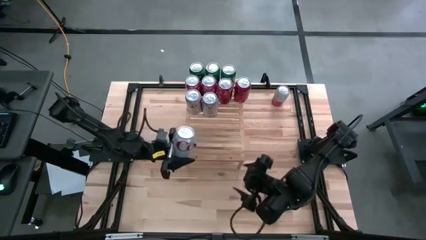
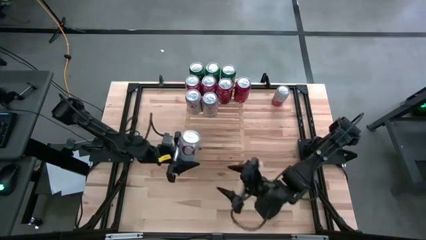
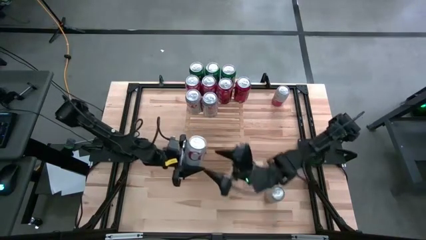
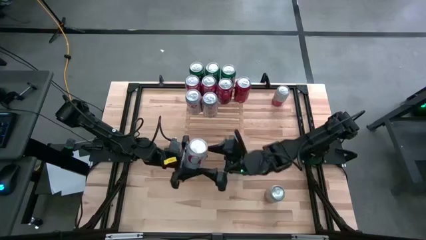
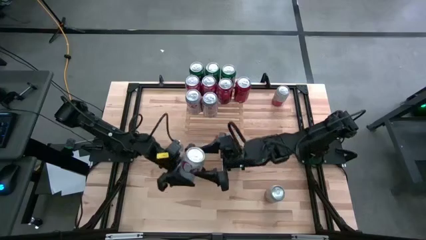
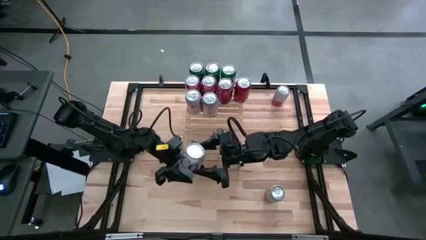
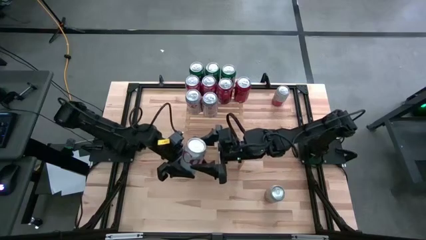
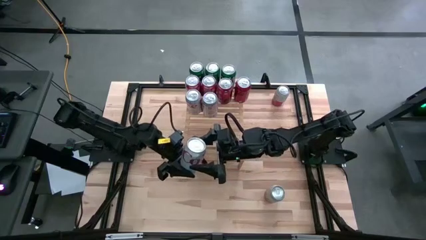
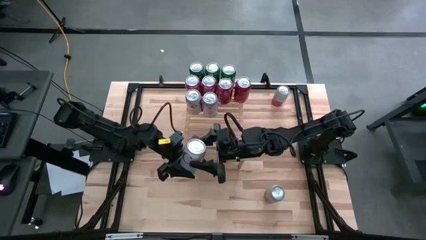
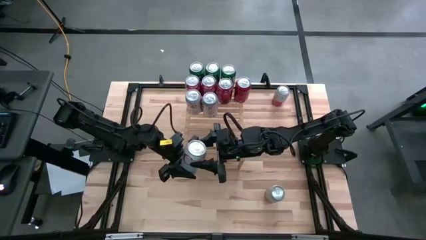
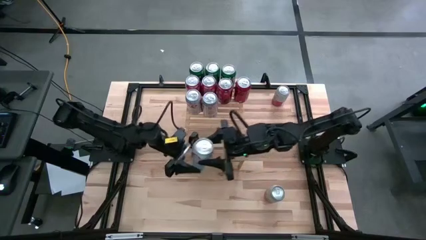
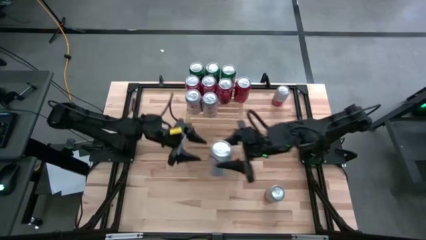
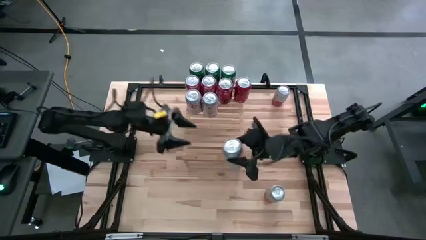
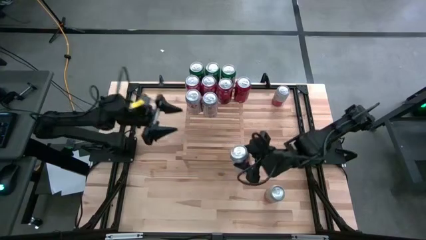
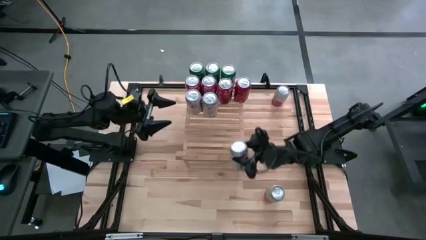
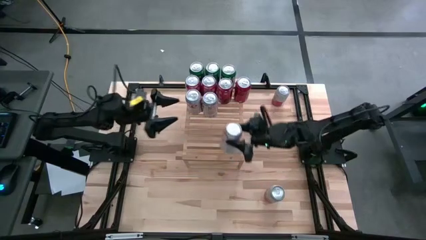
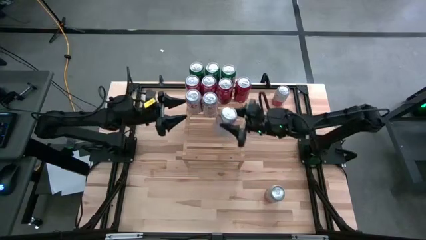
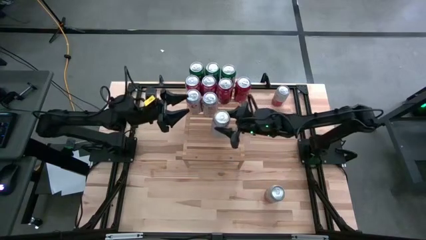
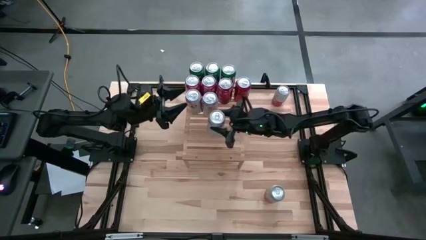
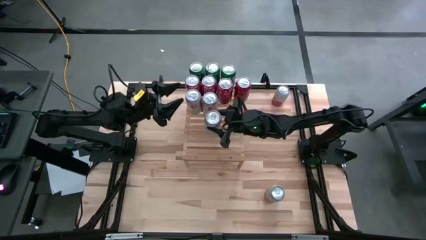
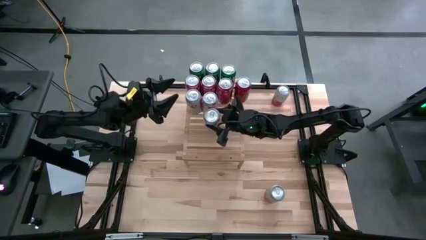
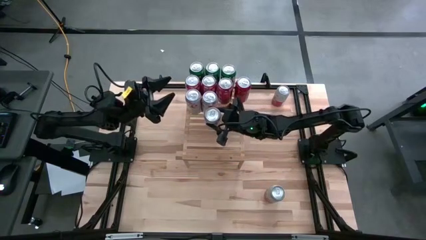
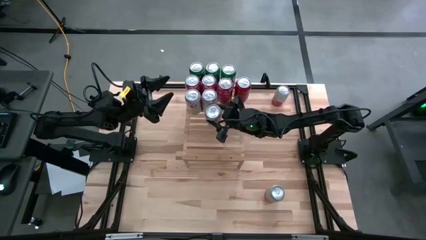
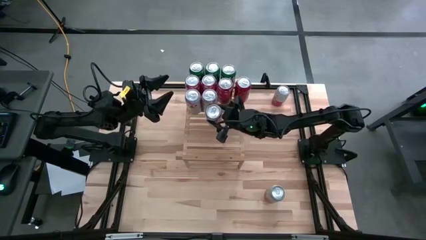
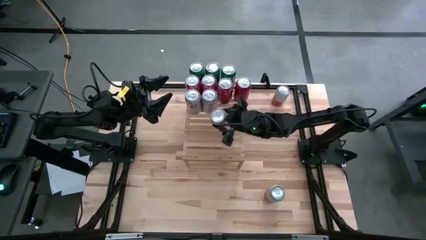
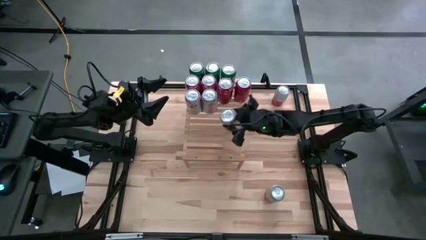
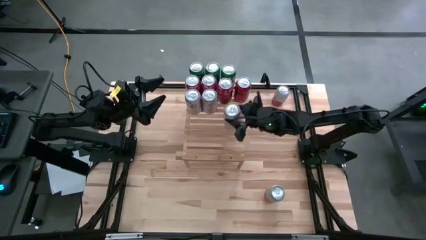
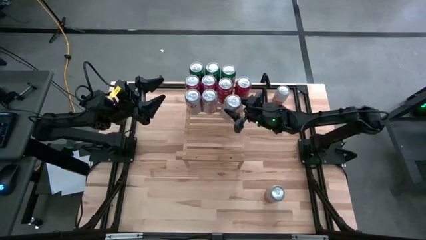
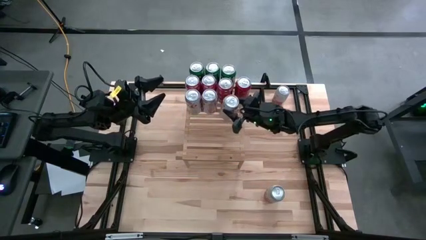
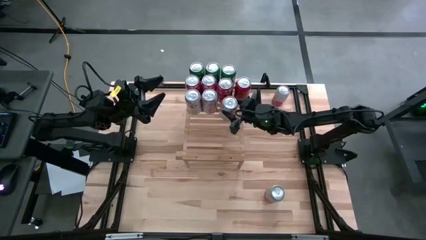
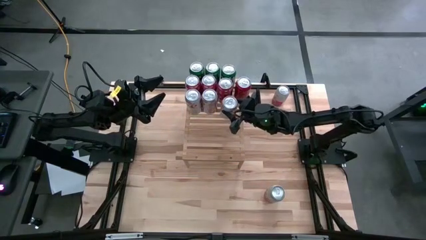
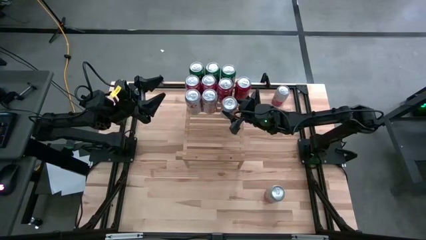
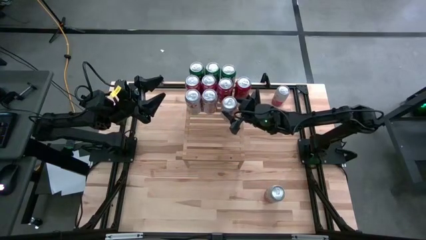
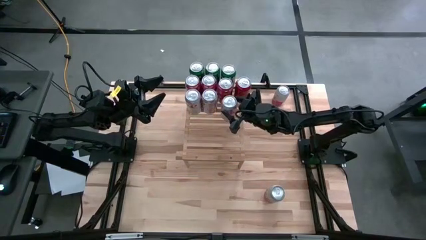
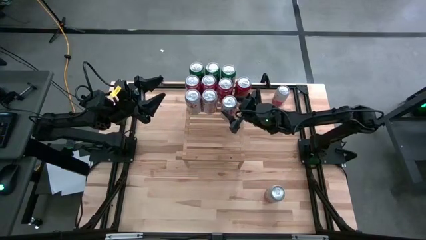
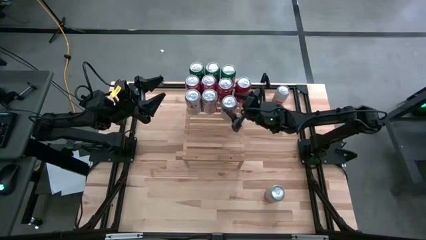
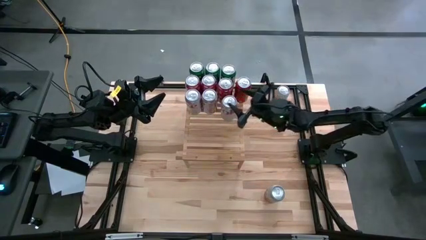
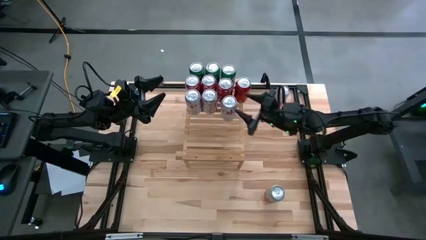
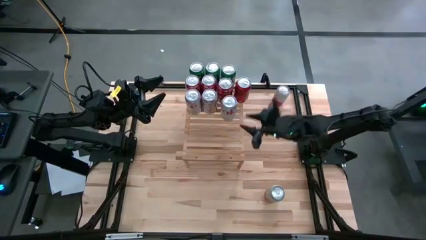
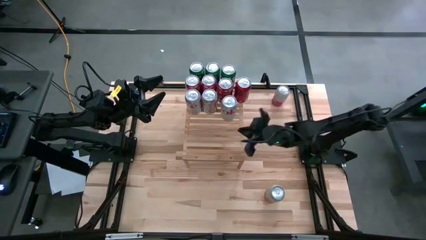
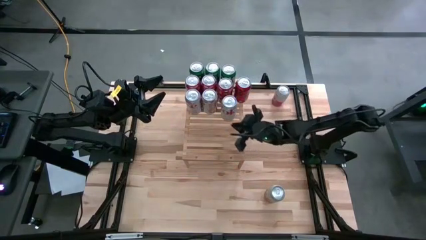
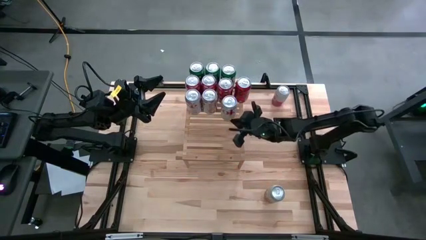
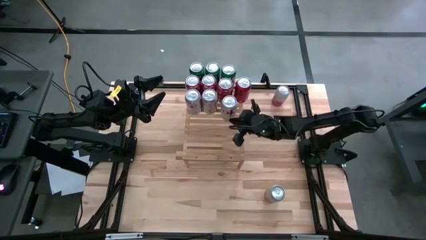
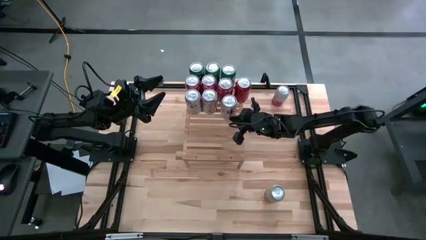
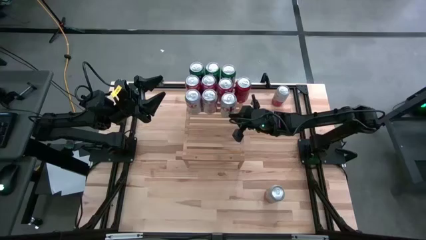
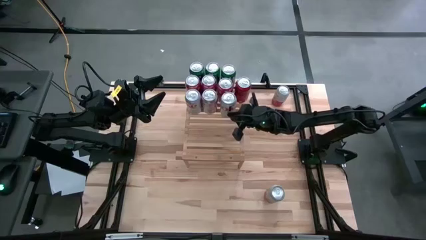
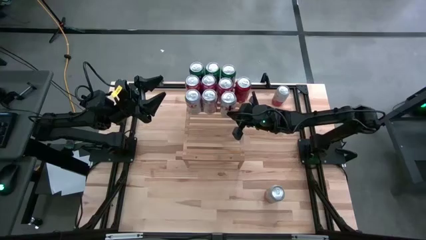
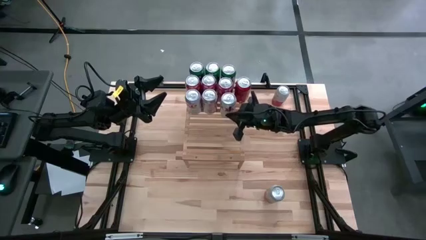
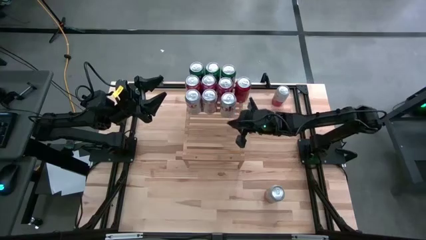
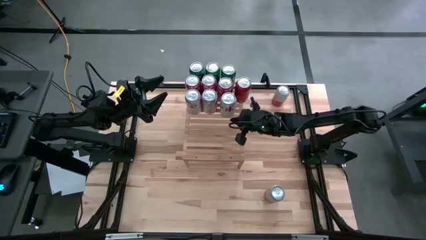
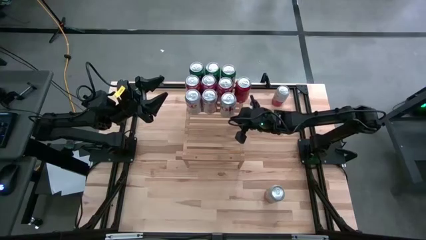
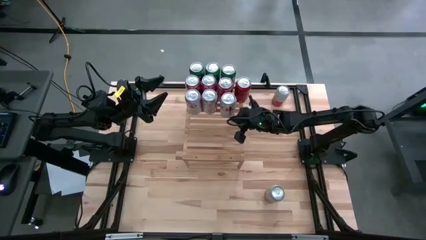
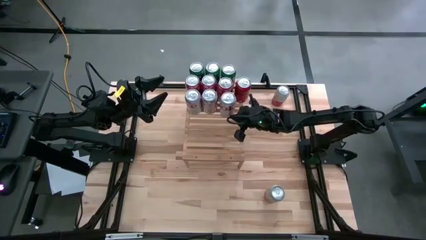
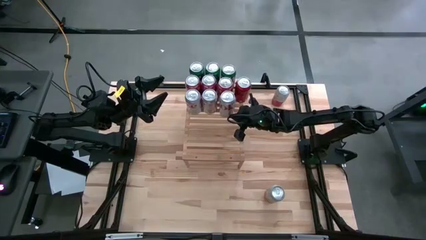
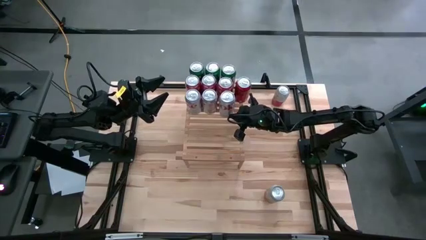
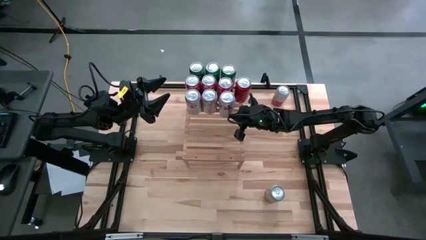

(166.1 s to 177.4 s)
Task: Place canned beverage on shelf
Put the top silver soda can on the shelf aligned with the other silver soda cans

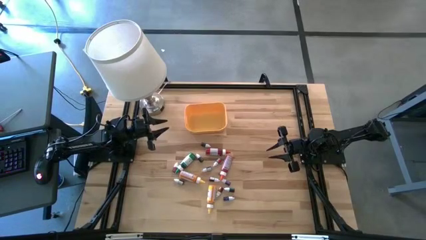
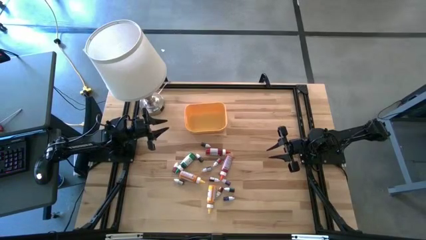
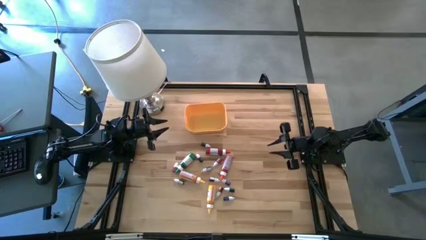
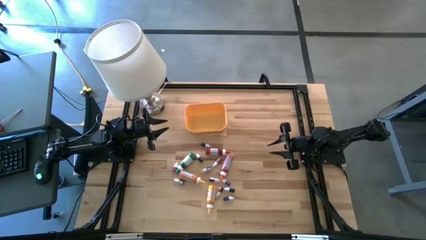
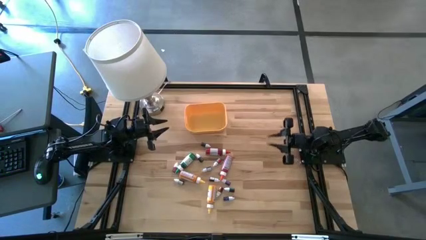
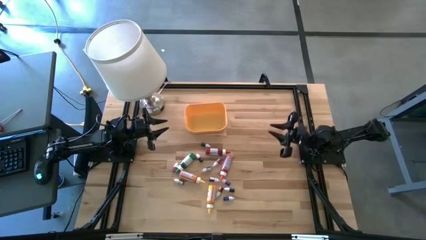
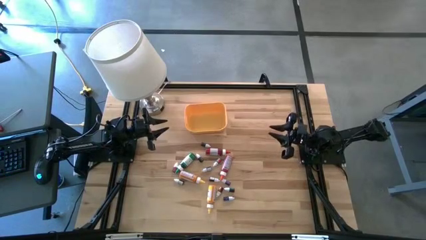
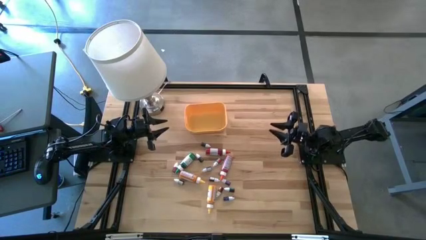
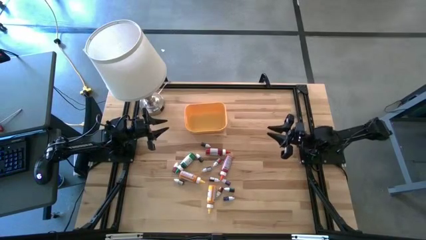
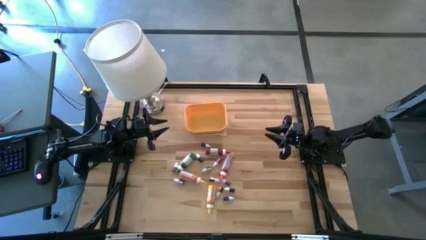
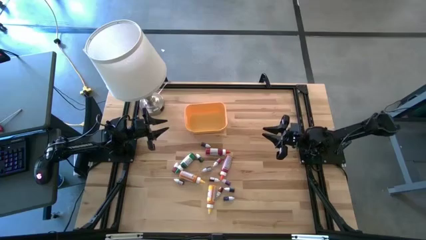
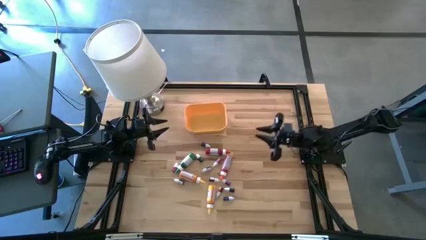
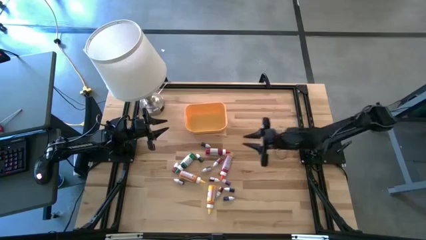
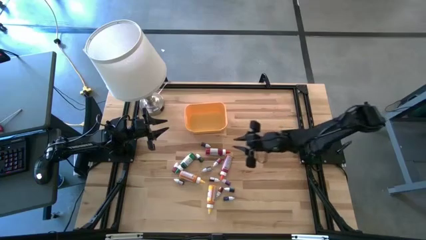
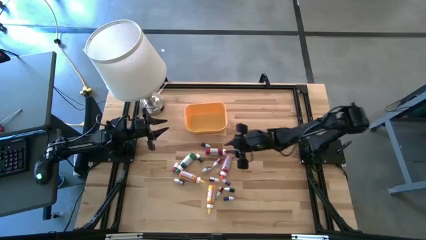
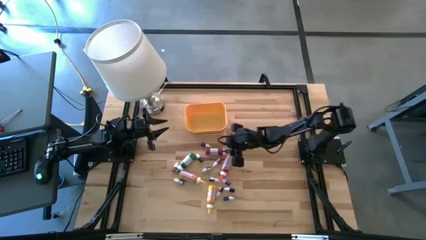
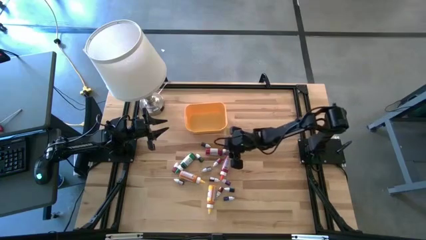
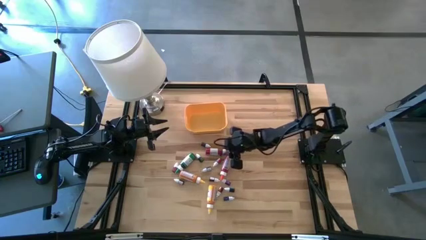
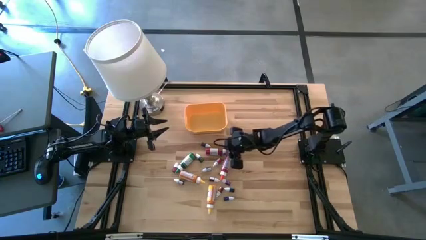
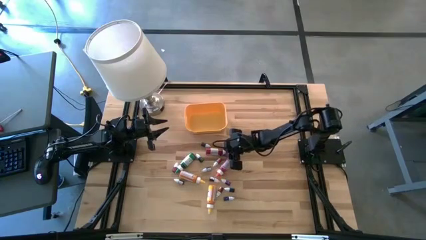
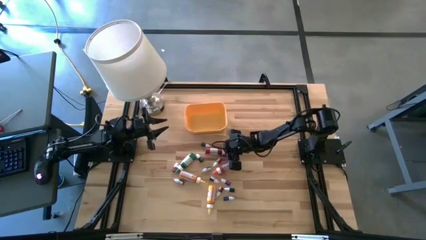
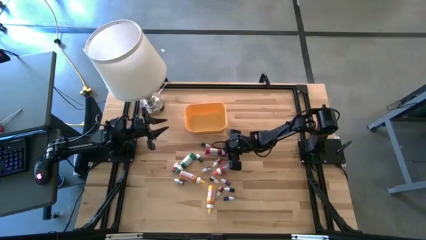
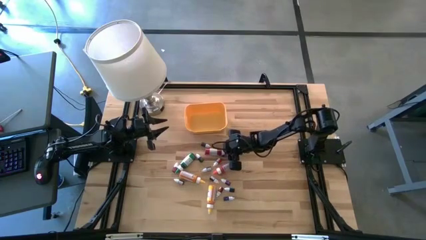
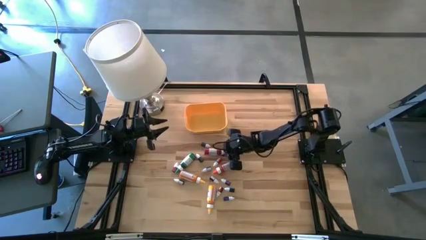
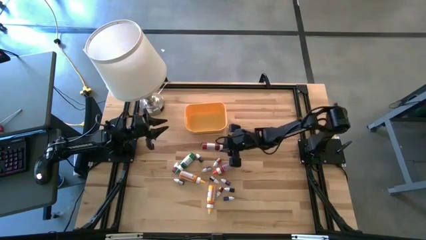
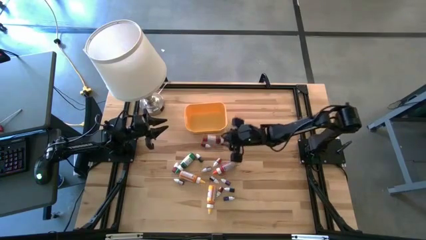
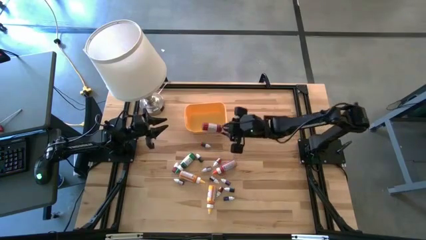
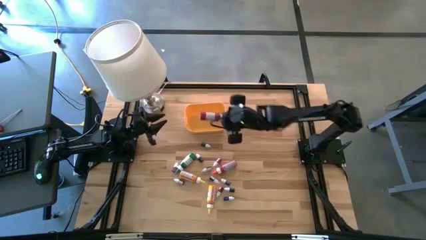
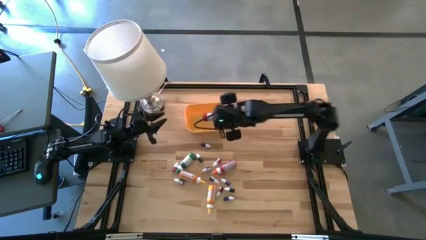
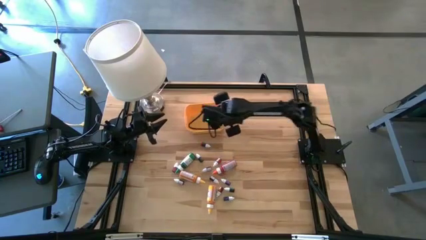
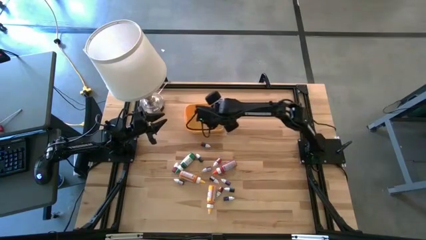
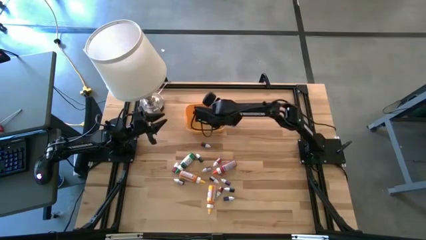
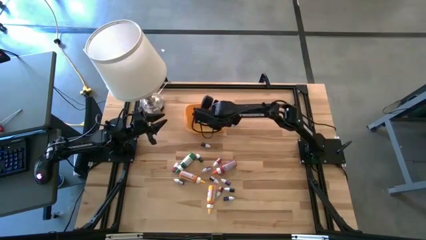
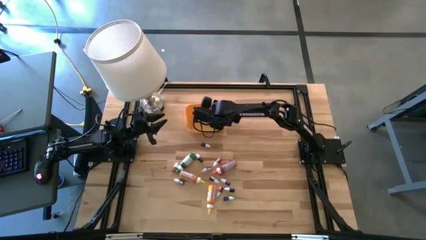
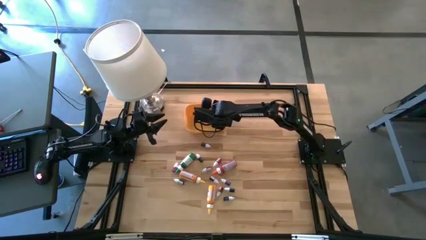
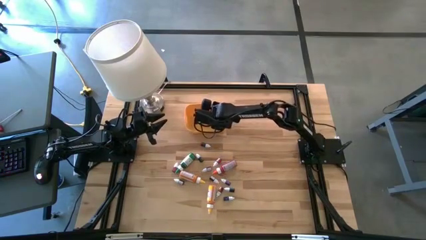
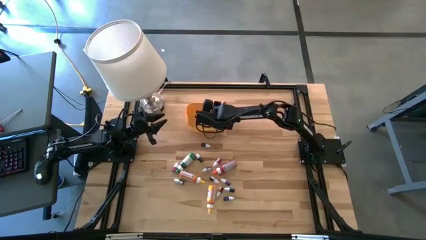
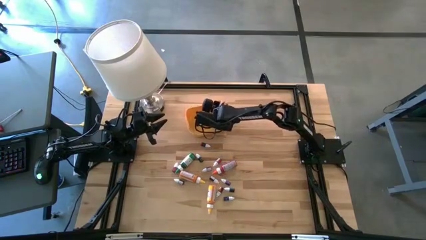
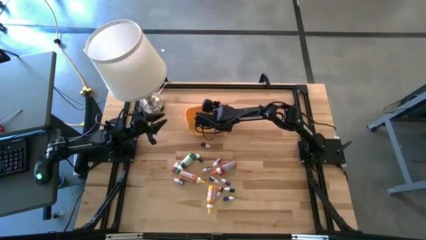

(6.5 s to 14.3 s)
Task: Pick & Place food coloring
Put the large red food coloring bottle into the bin
